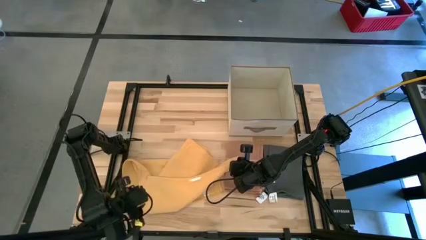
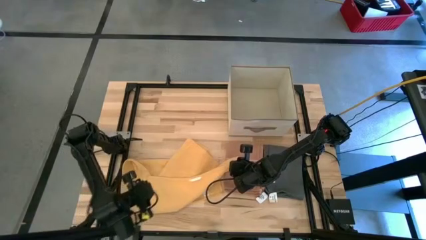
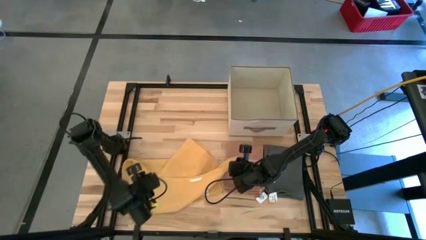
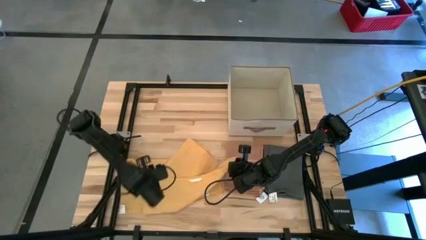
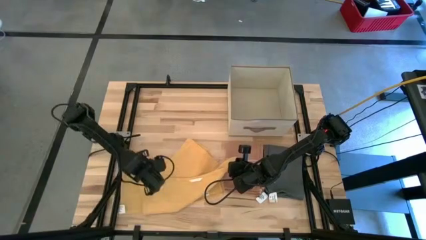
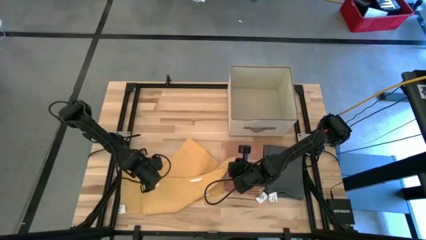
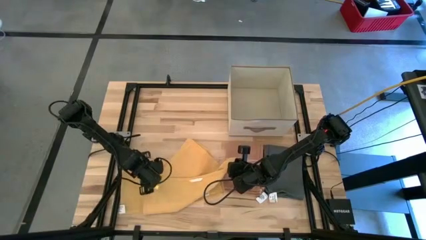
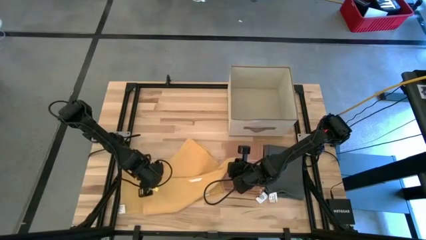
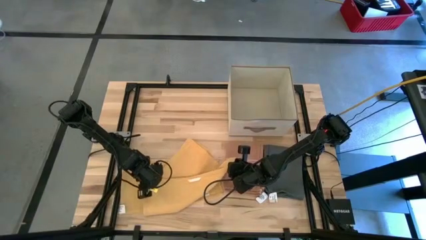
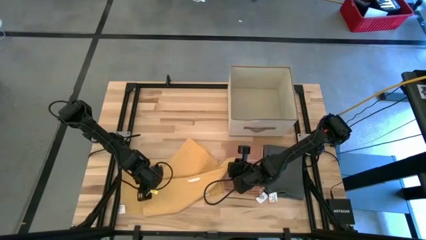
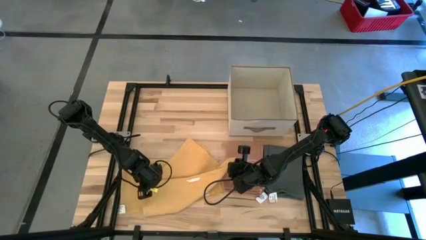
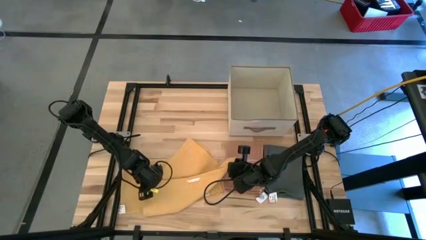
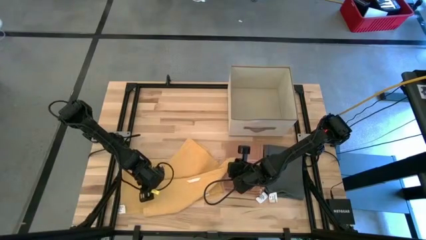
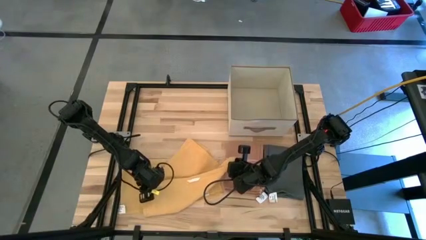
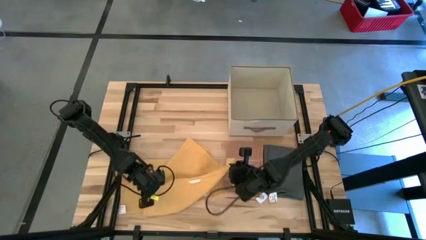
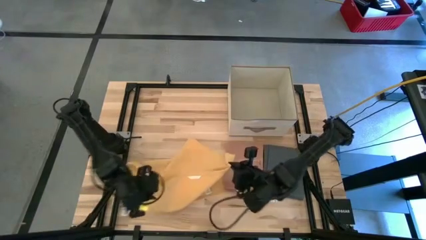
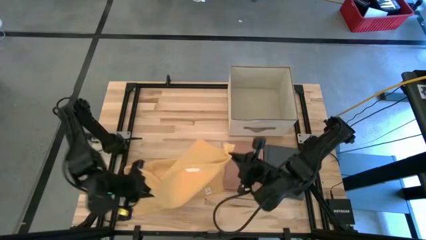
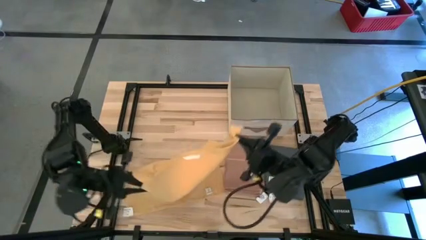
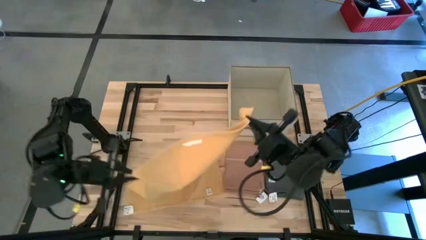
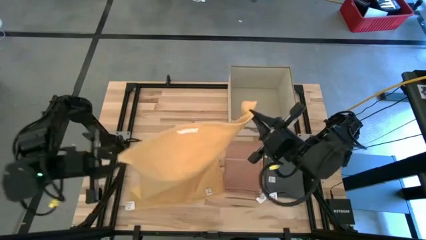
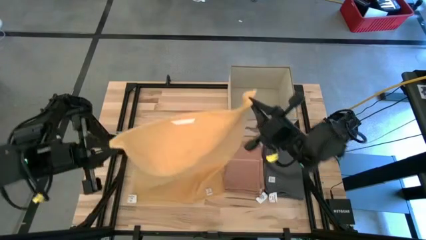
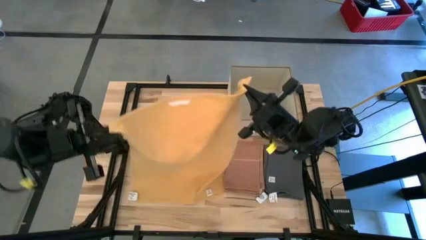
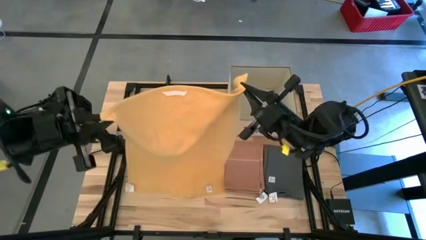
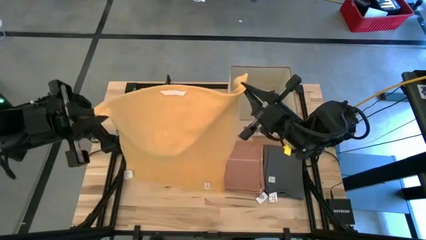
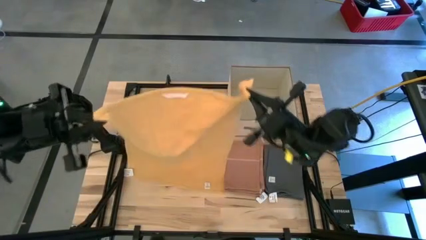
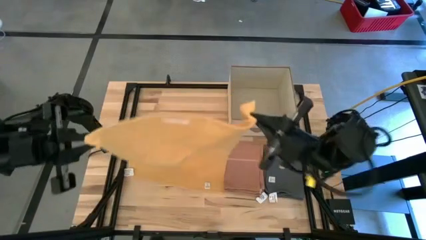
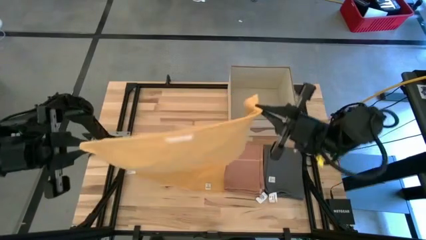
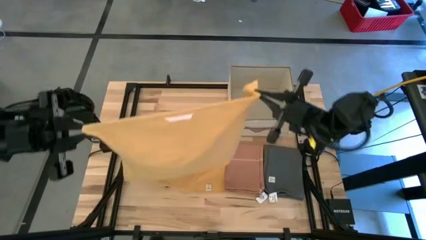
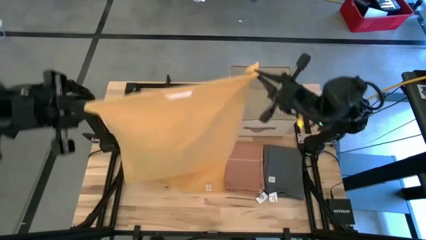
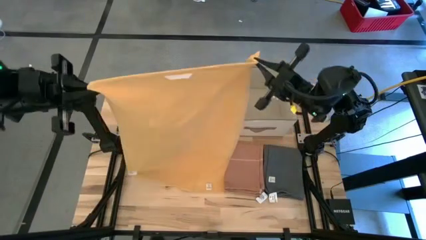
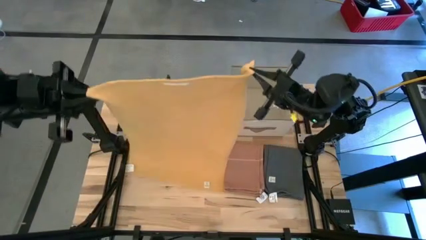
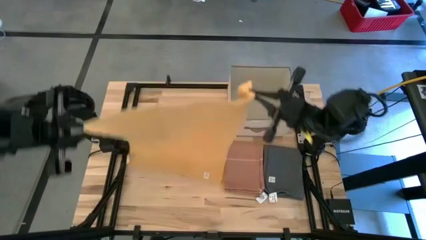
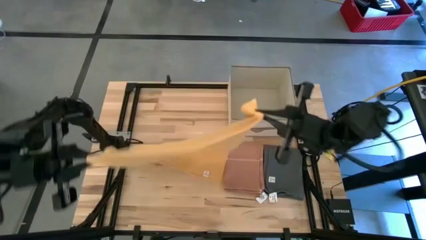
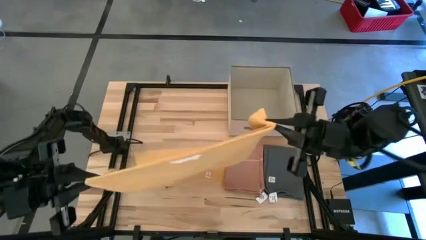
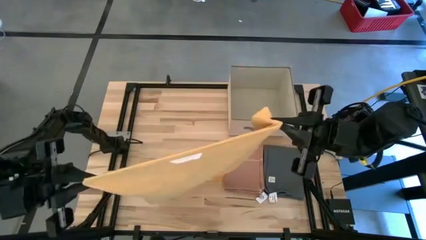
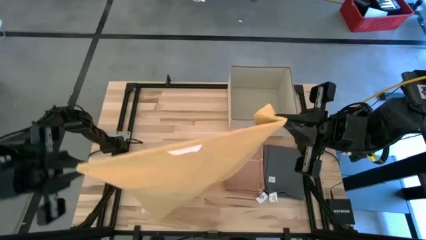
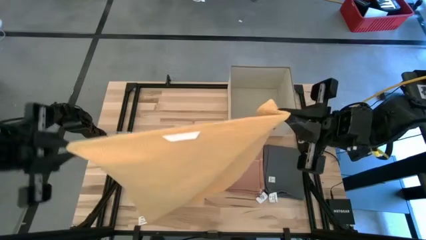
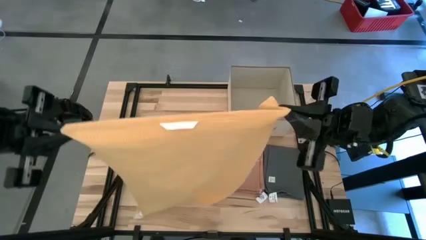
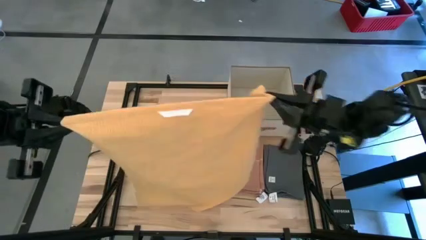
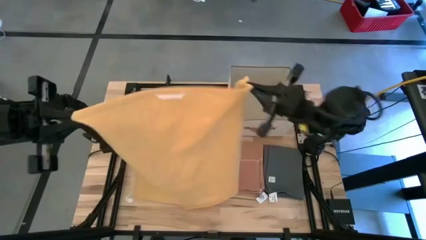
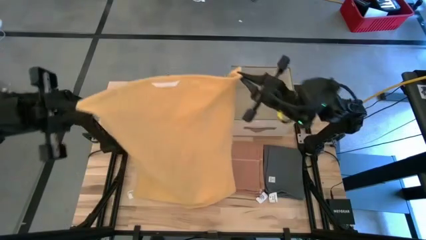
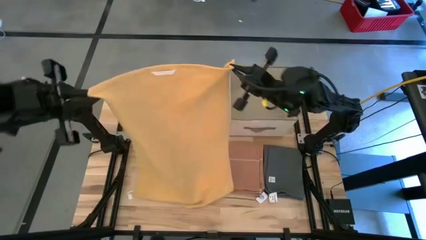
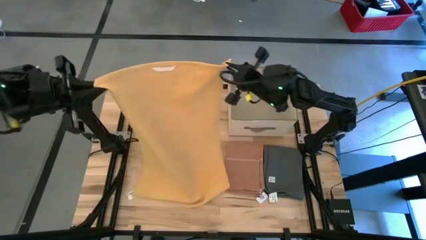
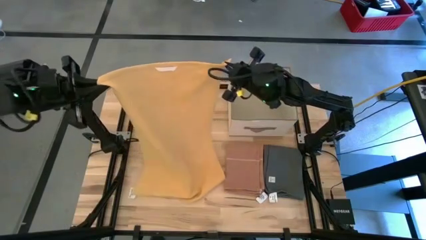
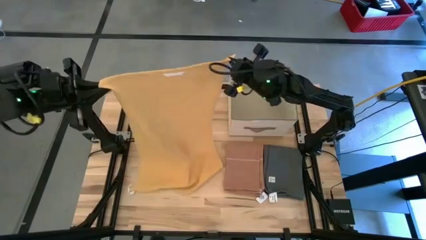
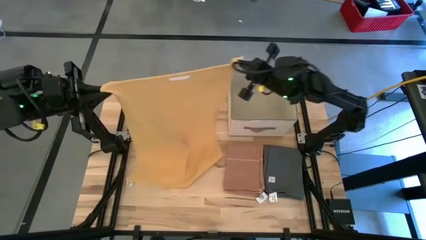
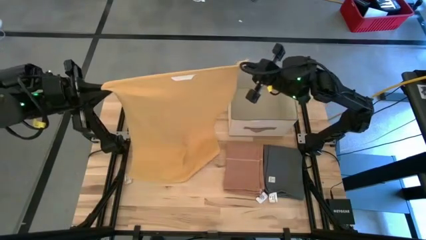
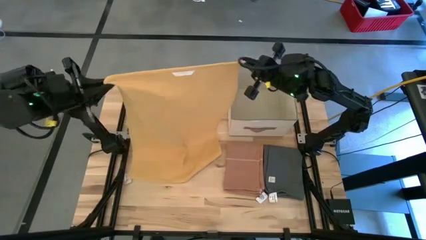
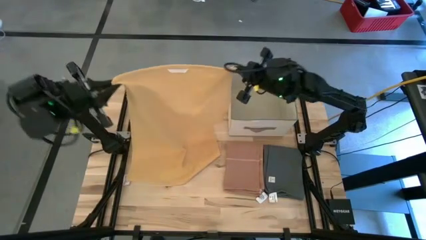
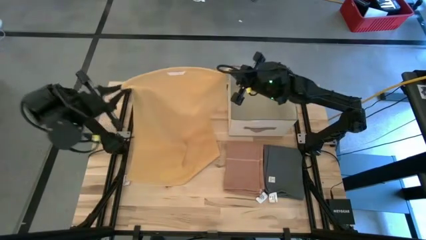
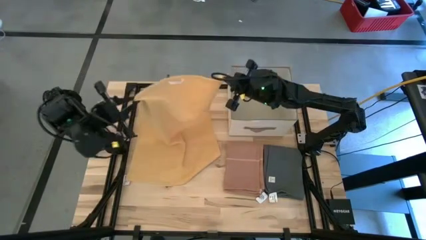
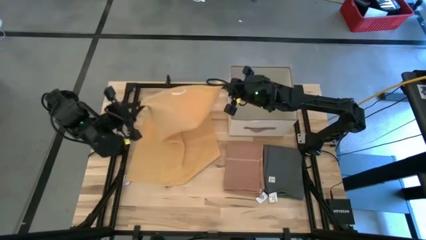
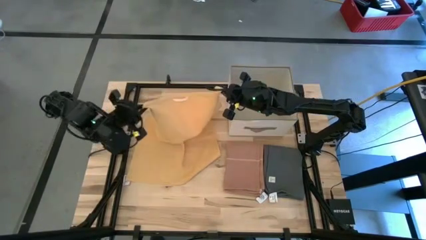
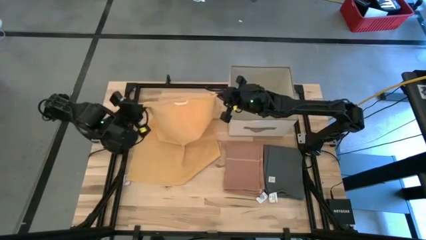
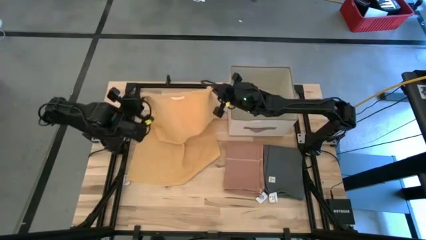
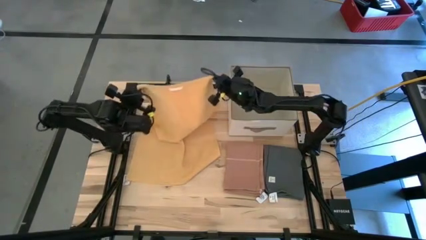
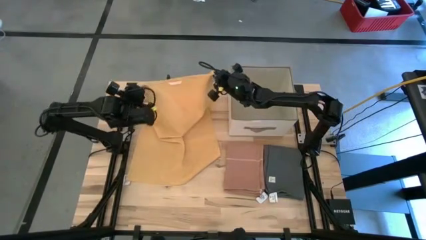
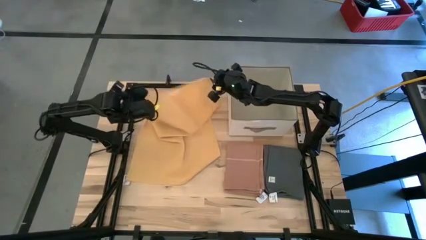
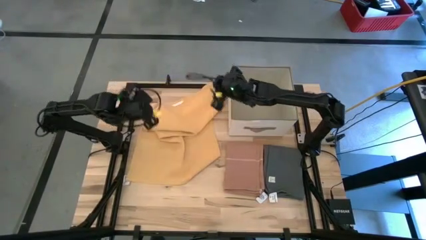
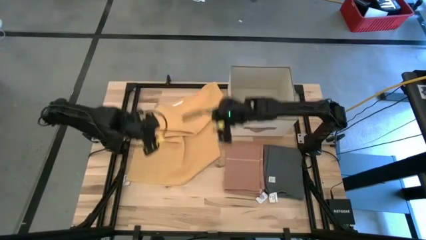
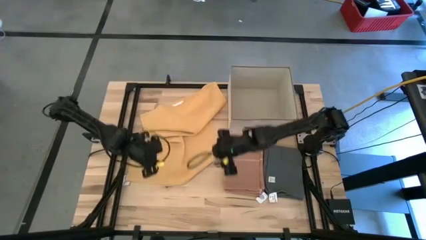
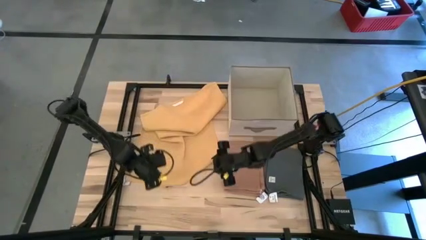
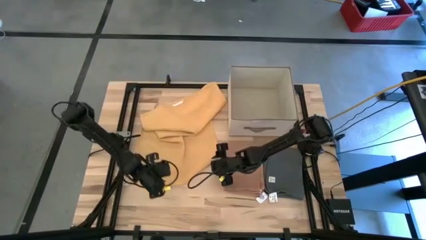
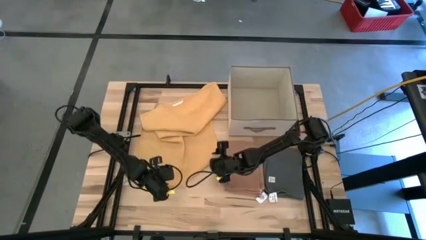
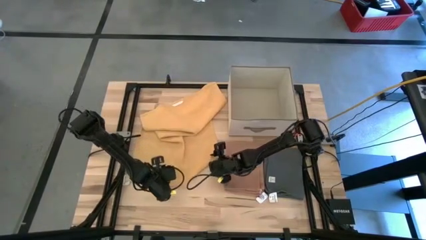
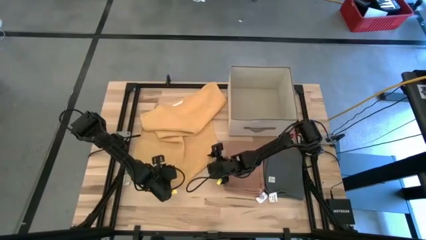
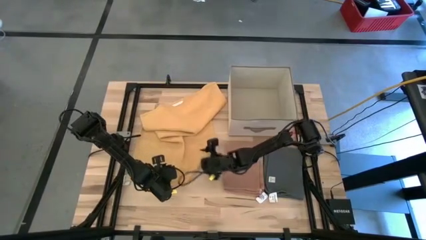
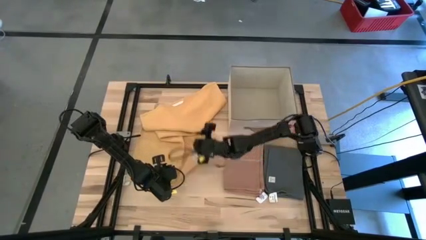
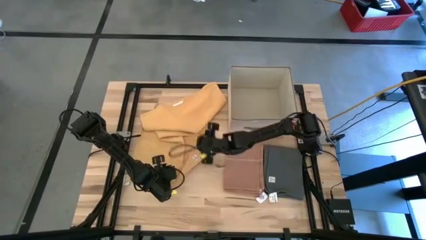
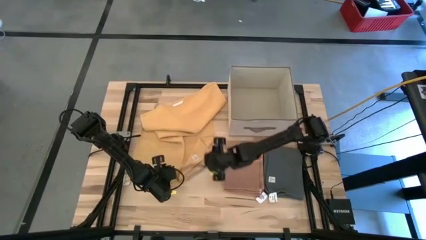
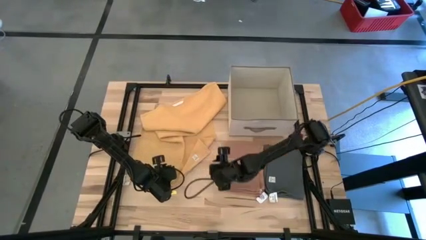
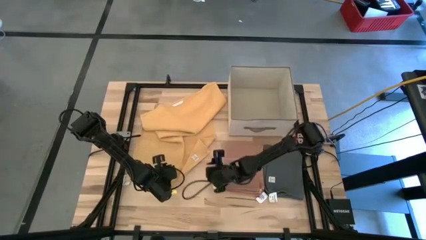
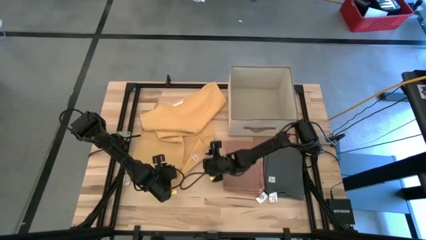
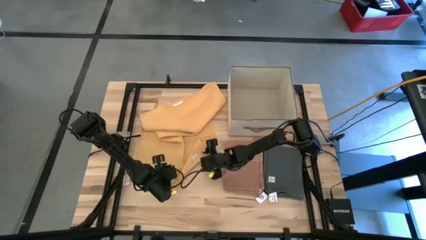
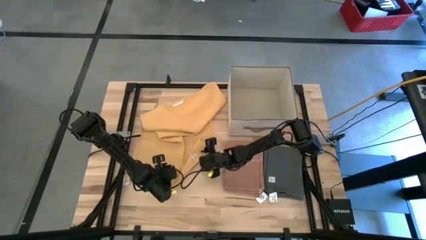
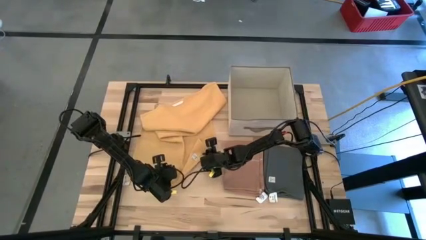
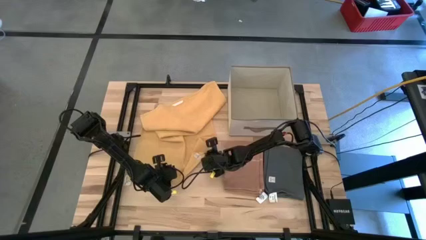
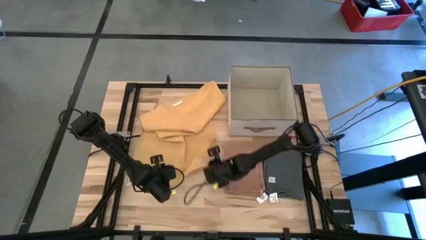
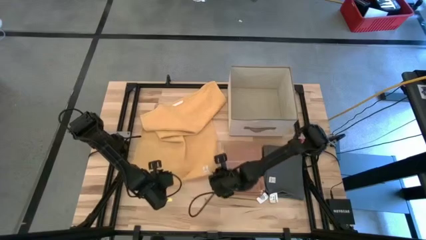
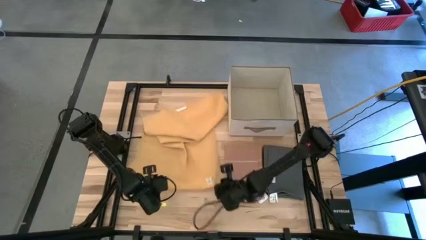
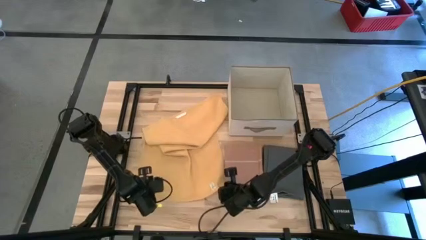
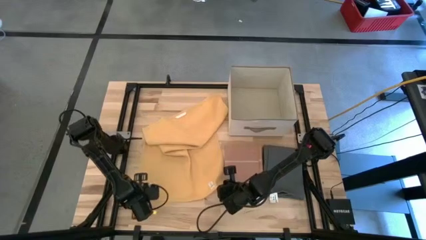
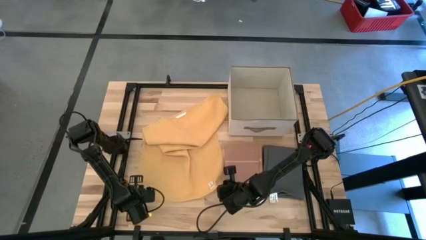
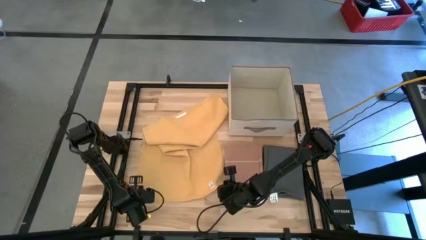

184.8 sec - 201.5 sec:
Task: Fold towel
Fold the yellow towel
